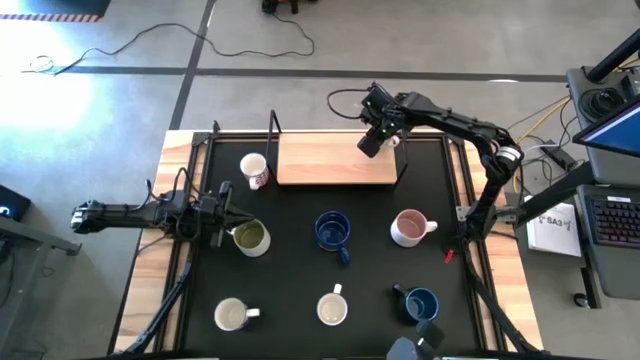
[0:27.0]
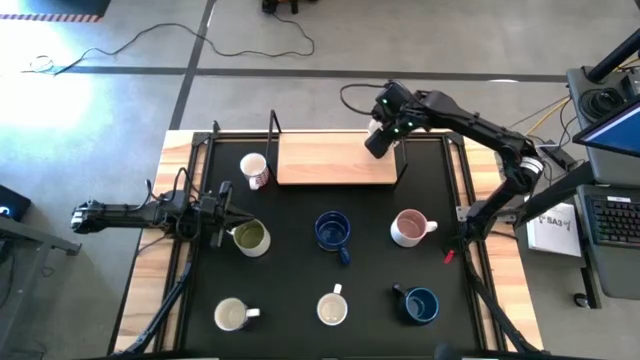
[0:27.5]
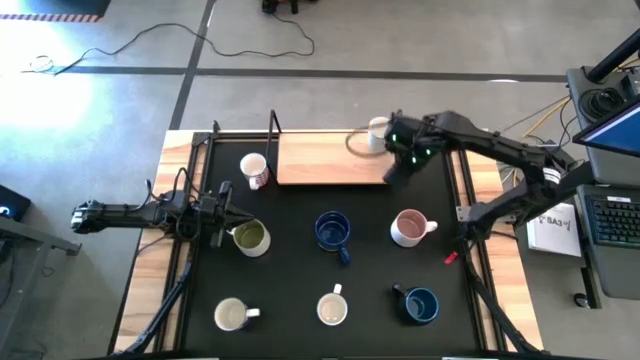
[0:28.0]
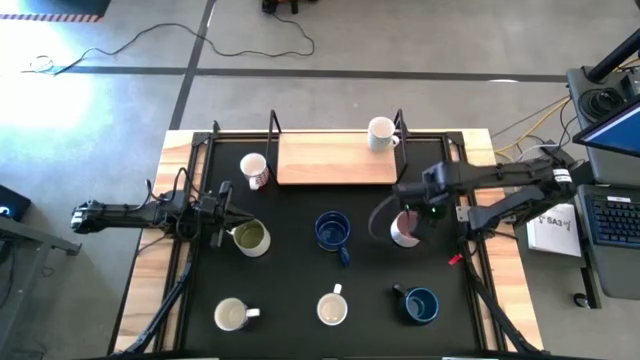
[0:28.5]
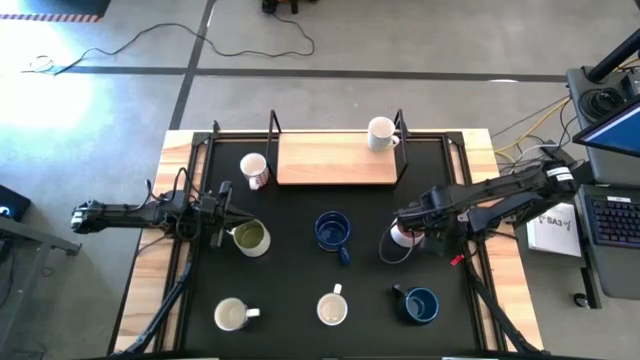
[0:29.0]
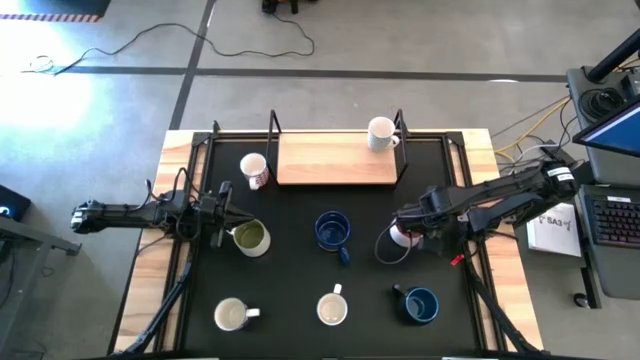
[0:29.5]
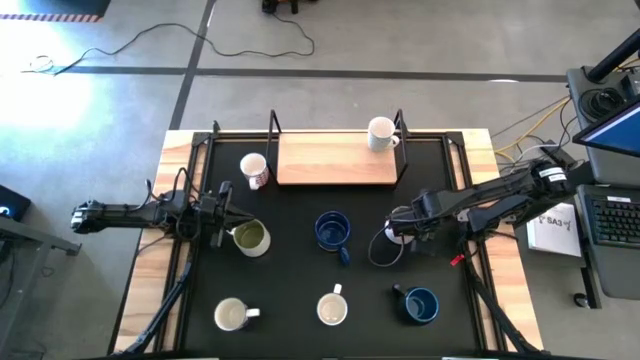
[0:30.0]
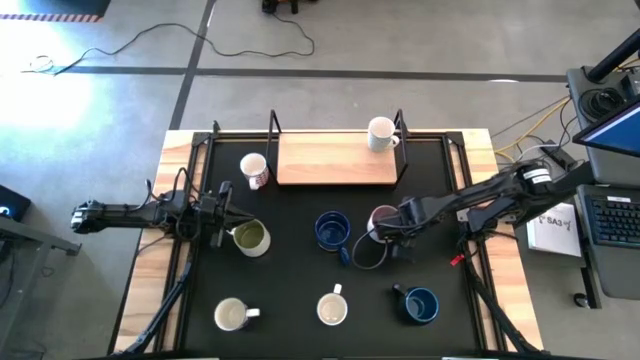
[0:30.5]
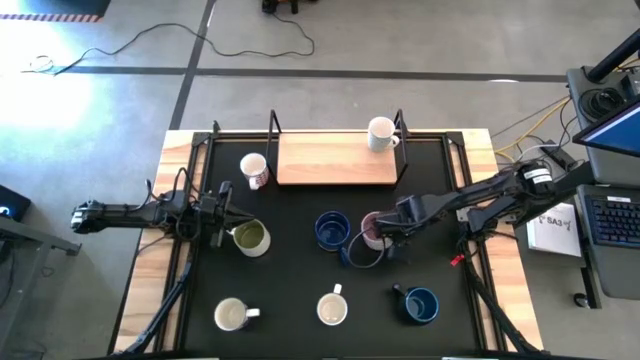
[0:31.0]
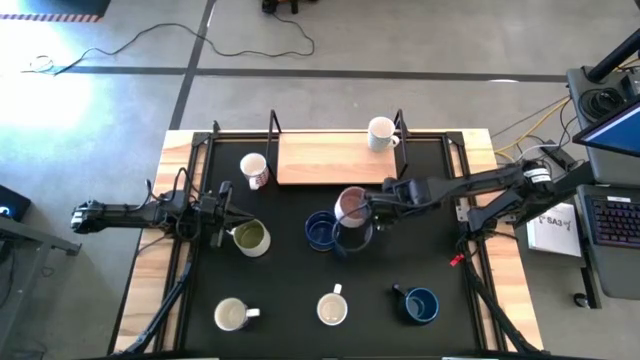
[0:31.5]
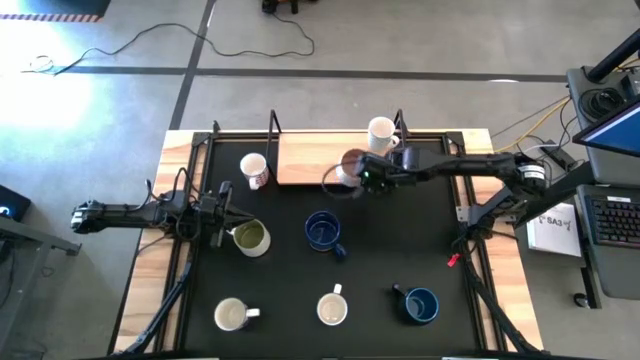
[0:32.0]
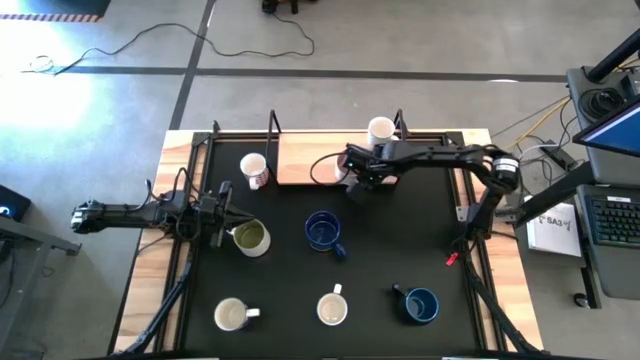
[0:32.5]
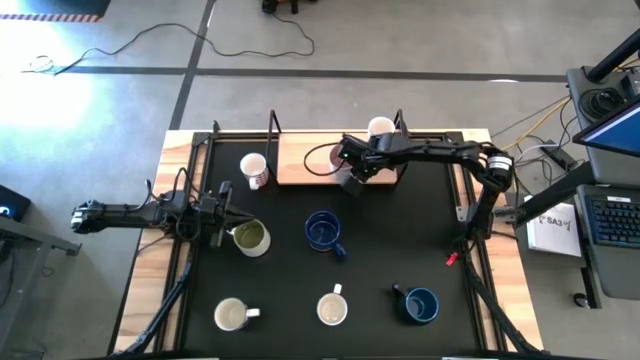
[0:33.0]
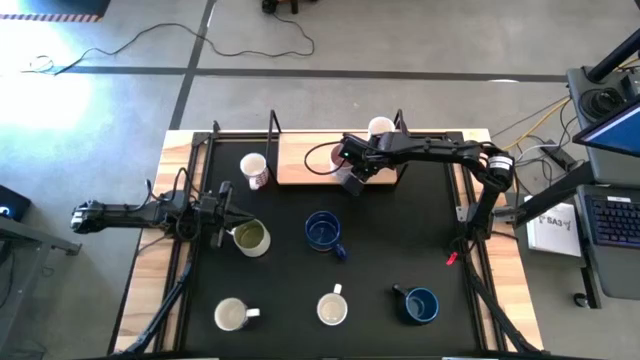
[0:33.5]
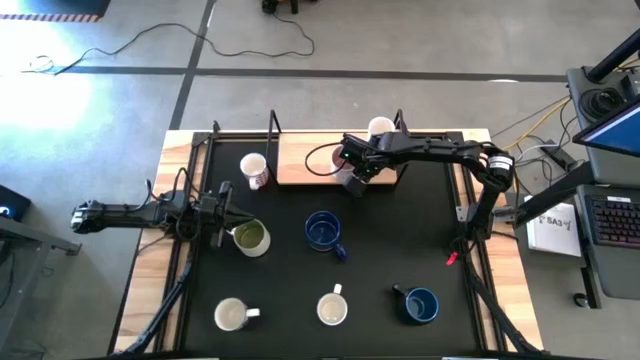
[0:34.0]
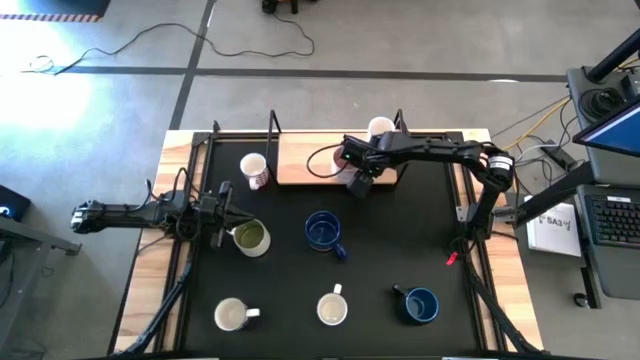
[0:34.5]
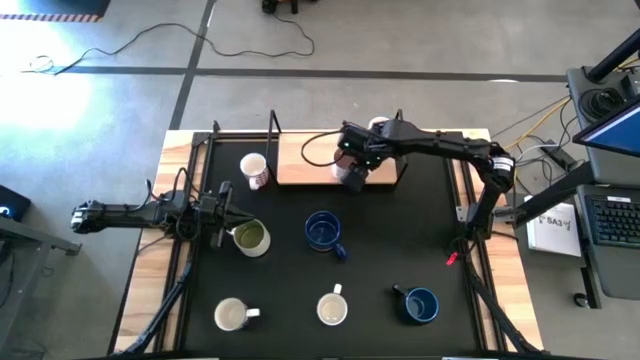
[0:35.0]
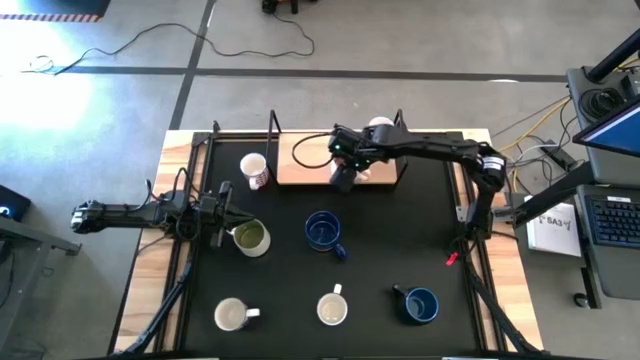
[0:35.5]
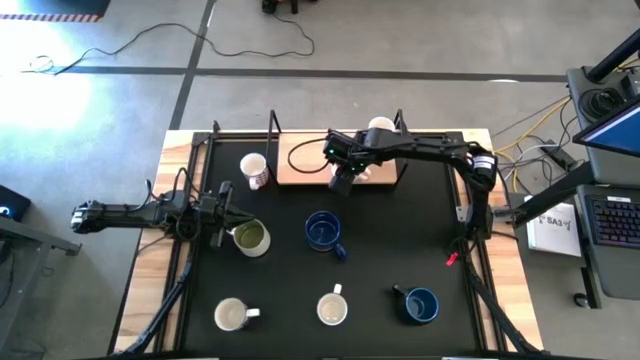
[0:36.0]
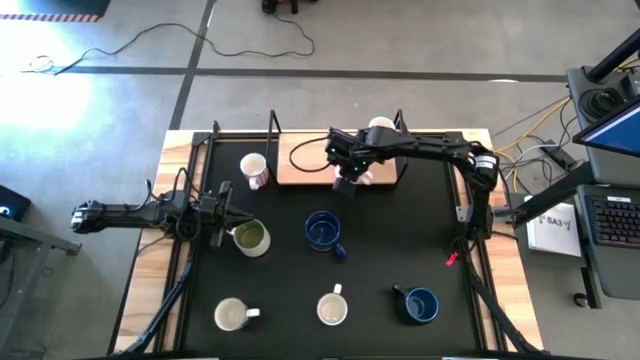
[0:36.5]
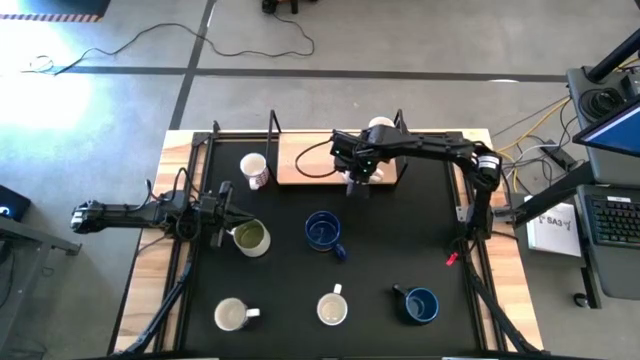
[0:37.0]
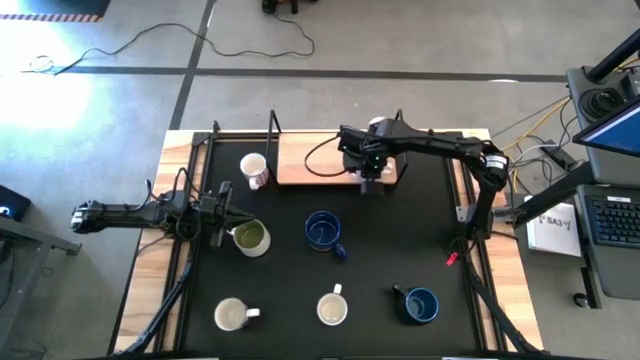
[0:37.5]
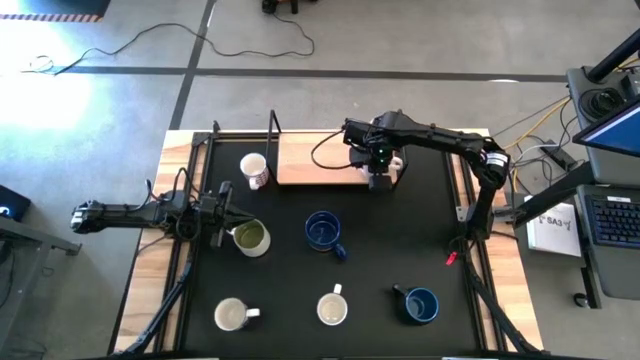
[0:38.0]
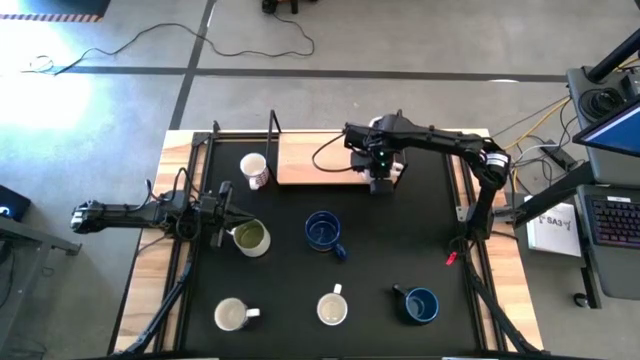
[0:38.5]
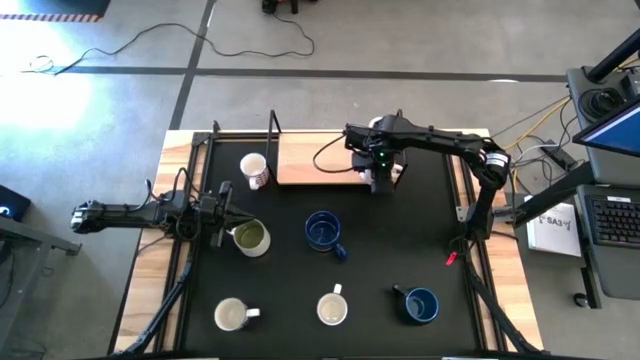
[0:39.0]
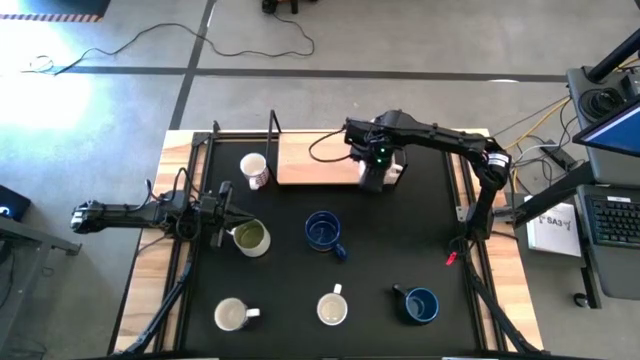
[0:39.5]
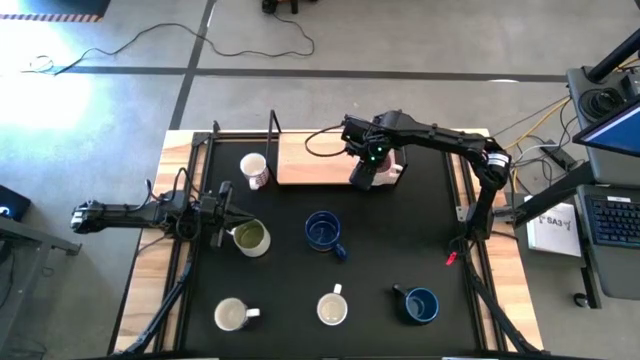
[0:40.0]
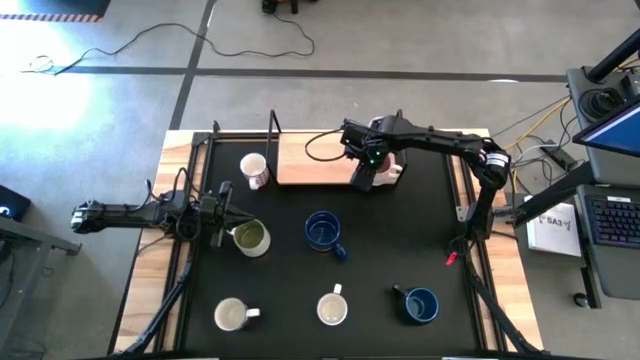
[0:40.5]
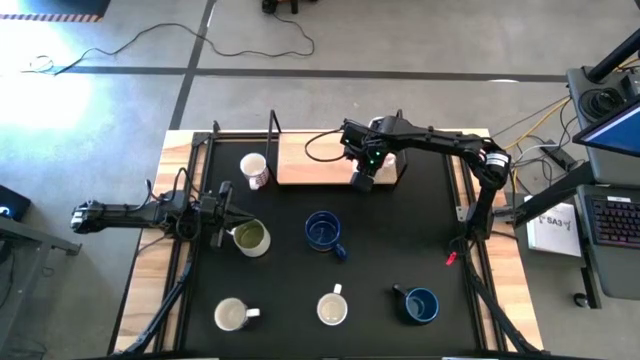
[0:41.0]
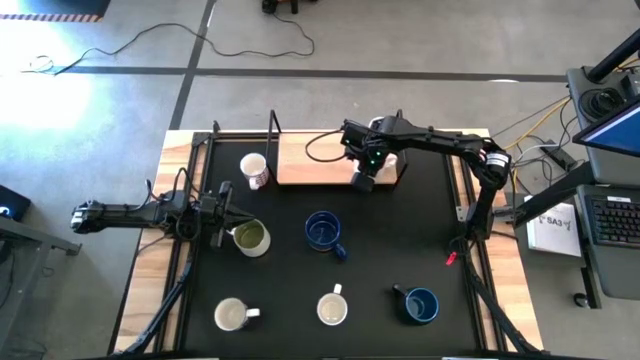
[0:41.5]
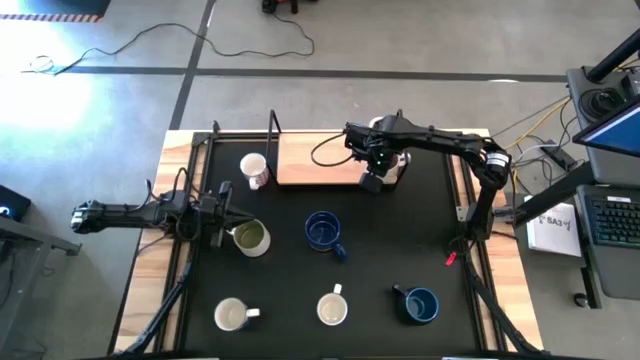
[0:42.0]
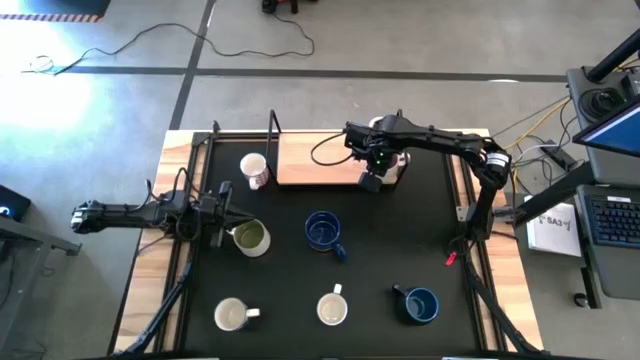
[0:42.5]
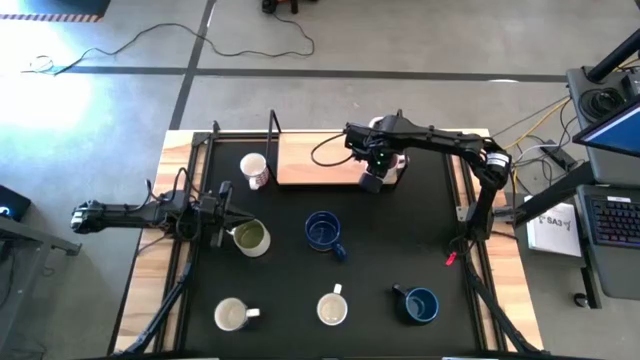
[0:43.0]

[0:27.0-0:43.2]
Task: Place coffee mugs
Put the pink mug on the shelf aligned with the other light blue mug

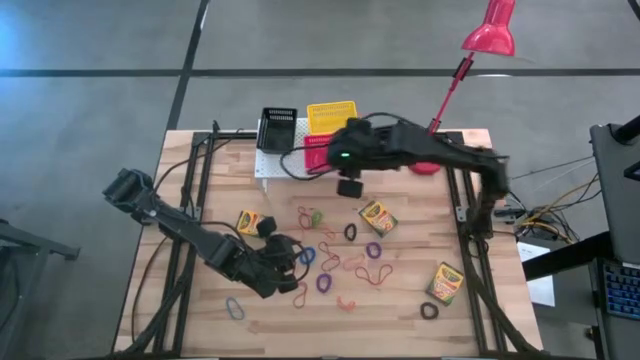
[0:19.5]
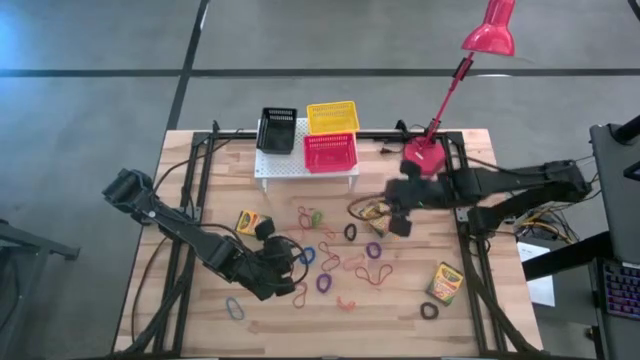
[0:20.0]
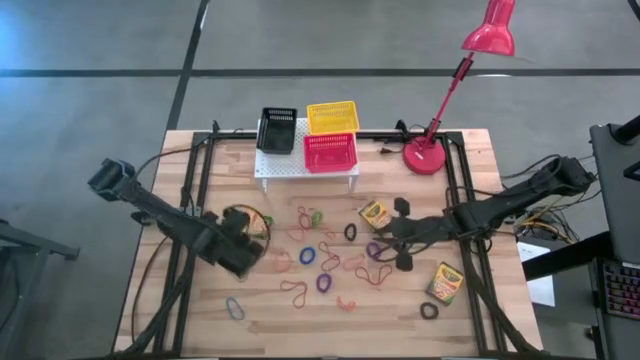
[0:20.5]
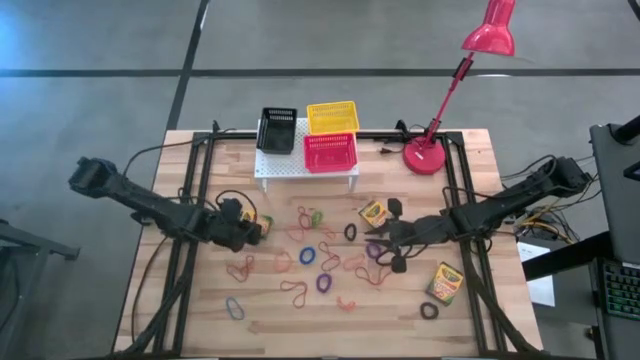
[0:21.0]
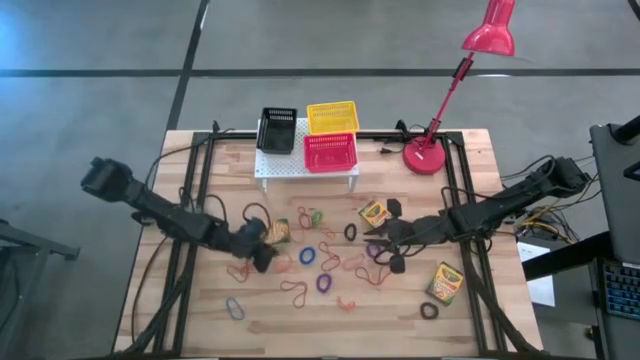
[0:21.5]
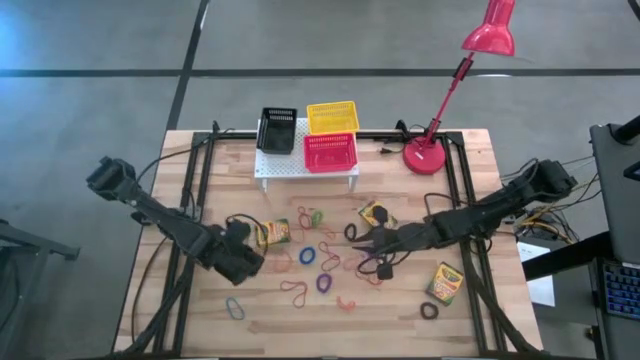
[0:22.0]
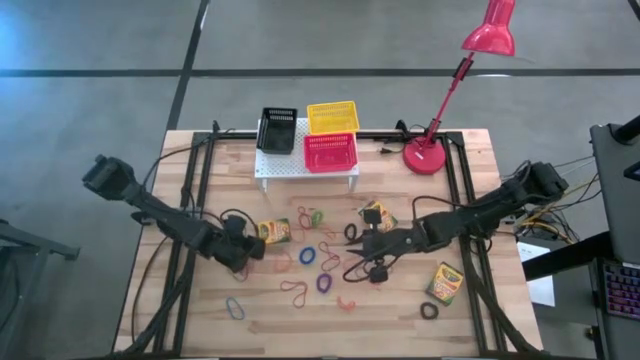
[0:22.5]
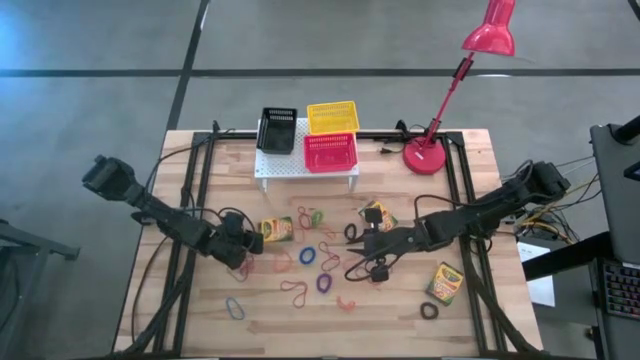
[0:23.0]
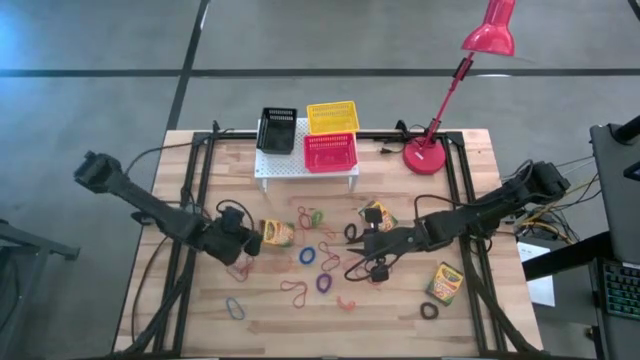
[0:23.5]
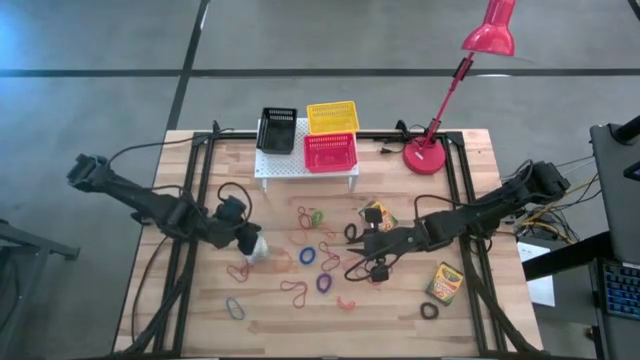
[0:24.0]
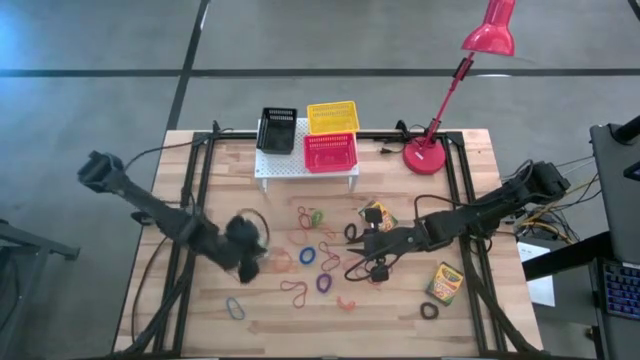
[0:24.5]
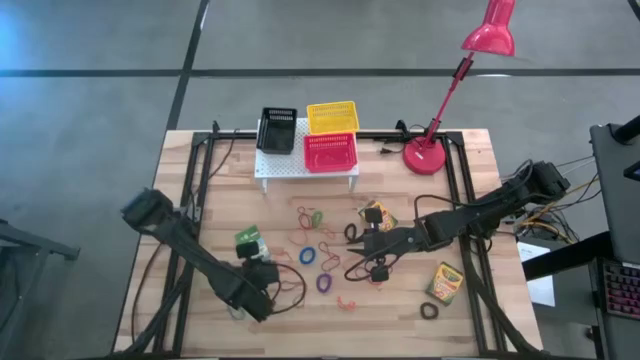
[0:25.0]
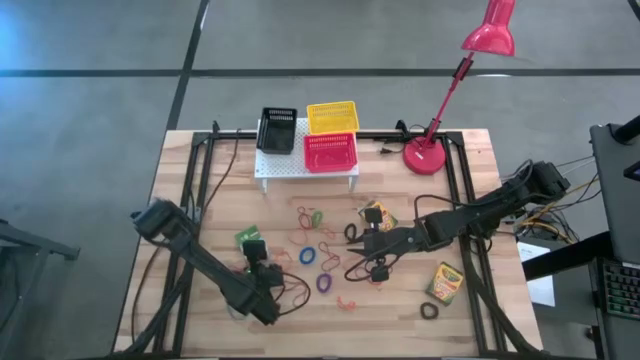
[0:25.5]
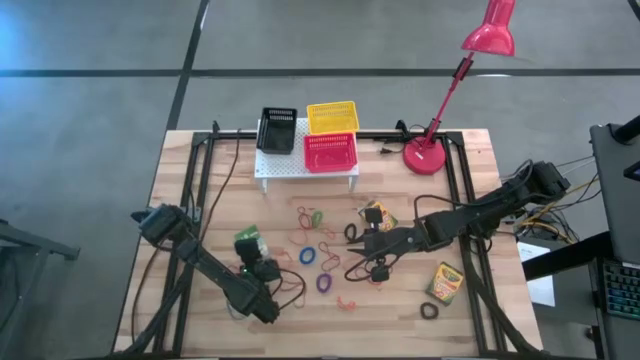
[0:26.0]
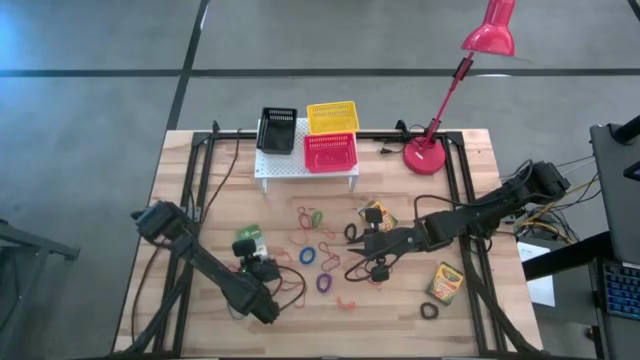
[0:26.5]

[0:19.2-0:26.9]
Task: Pick & Place Office Desk Supplies
Put the crayon box into the black bin on the shelf
